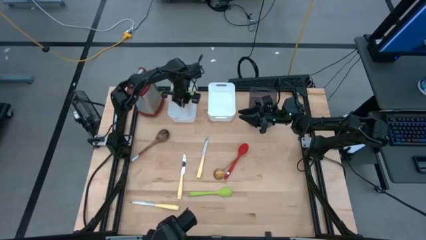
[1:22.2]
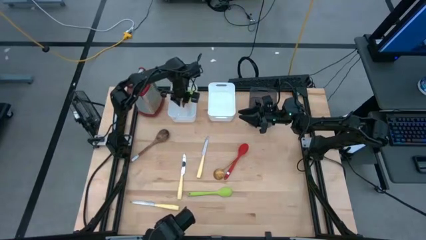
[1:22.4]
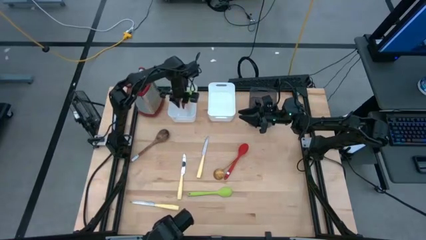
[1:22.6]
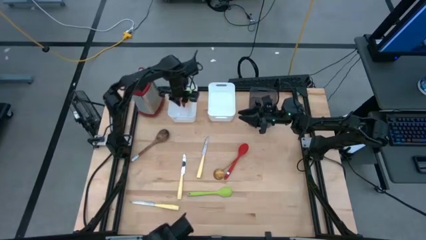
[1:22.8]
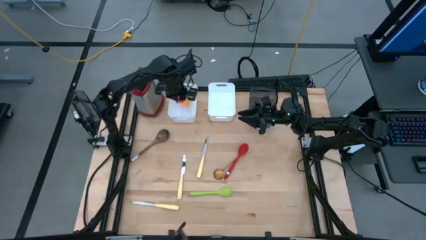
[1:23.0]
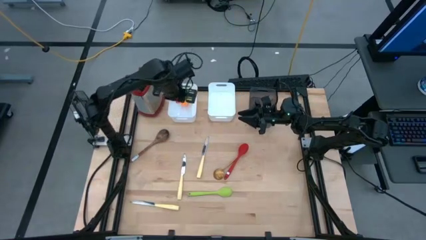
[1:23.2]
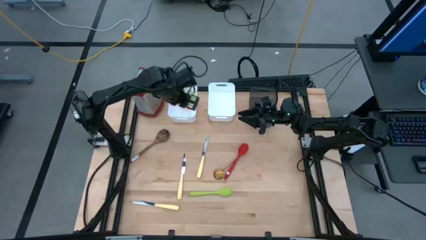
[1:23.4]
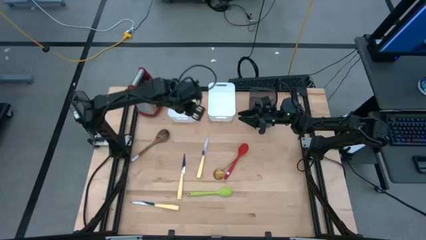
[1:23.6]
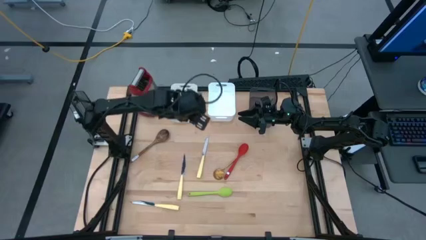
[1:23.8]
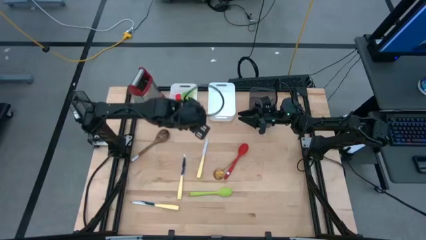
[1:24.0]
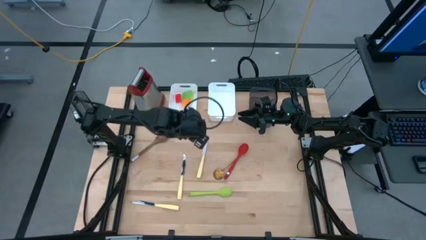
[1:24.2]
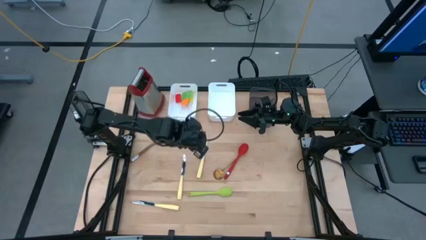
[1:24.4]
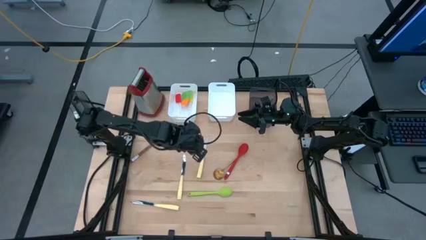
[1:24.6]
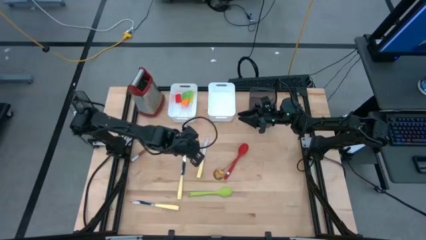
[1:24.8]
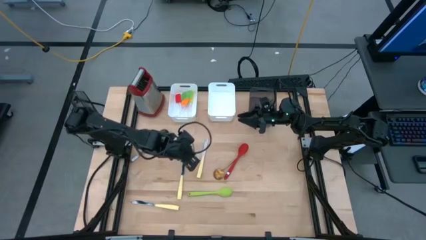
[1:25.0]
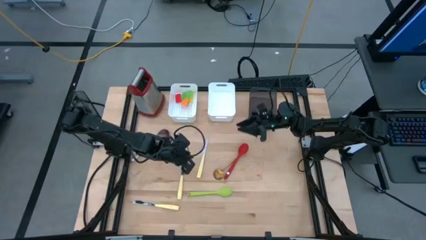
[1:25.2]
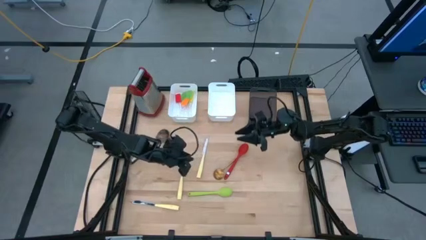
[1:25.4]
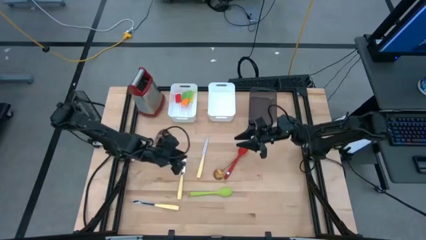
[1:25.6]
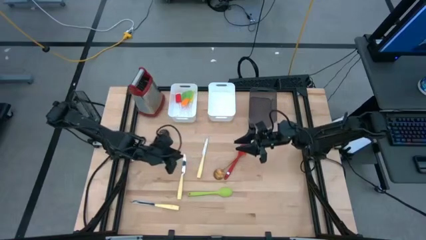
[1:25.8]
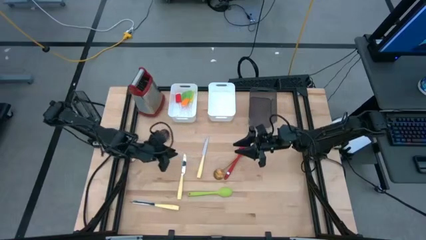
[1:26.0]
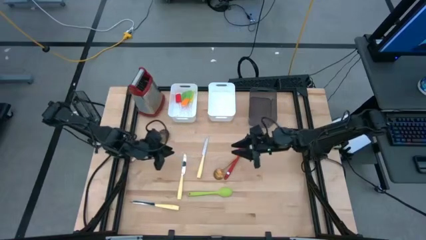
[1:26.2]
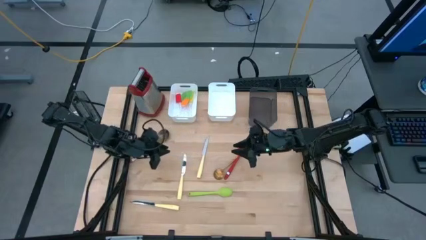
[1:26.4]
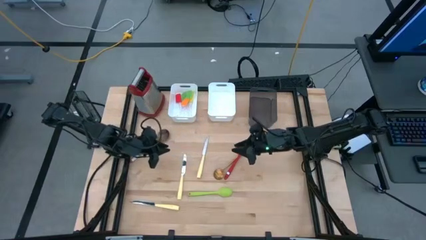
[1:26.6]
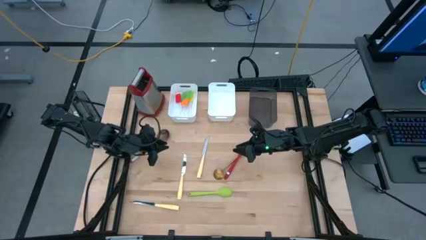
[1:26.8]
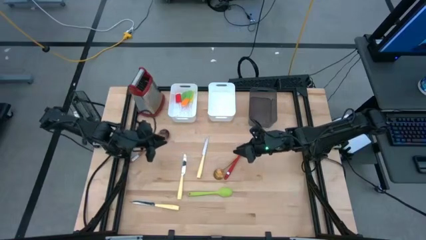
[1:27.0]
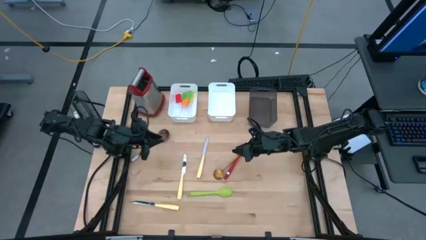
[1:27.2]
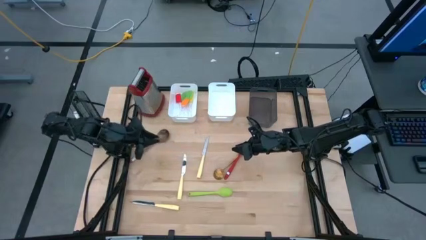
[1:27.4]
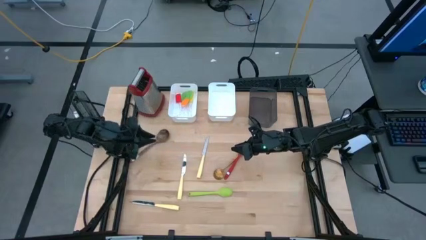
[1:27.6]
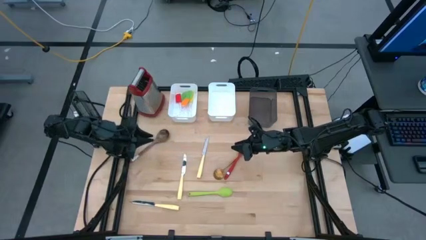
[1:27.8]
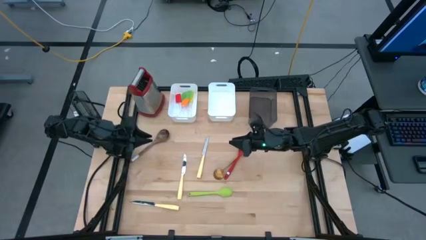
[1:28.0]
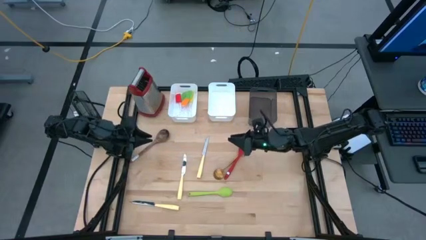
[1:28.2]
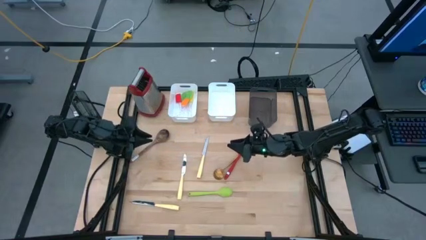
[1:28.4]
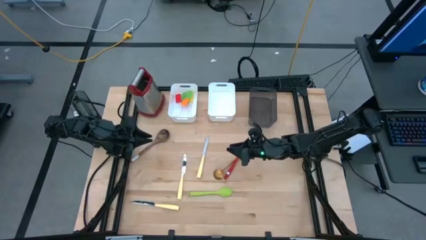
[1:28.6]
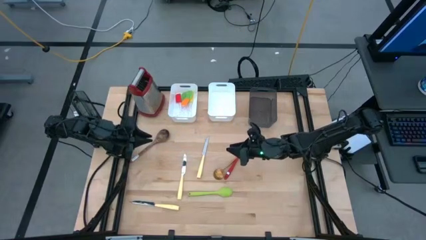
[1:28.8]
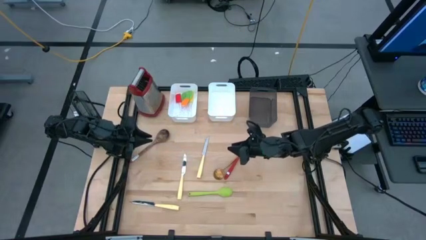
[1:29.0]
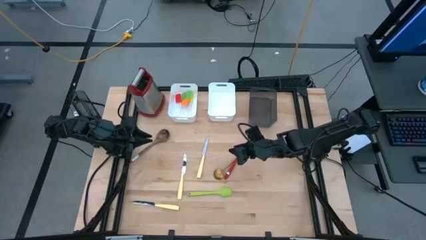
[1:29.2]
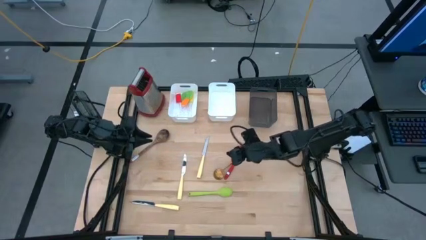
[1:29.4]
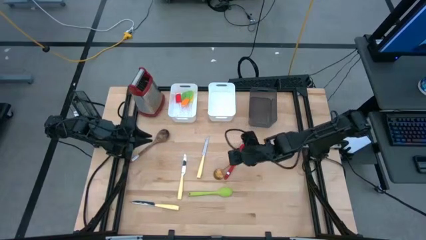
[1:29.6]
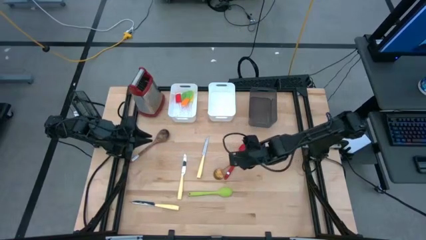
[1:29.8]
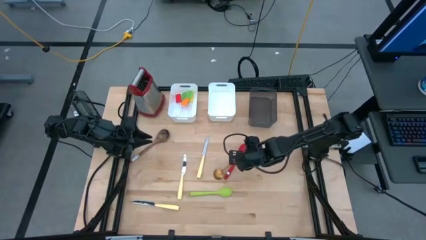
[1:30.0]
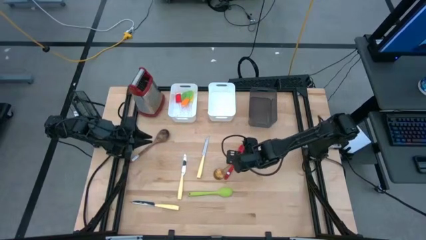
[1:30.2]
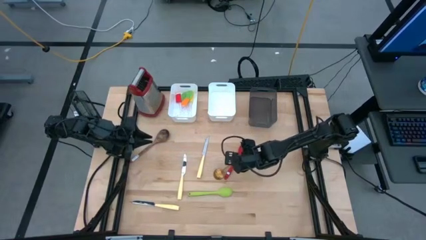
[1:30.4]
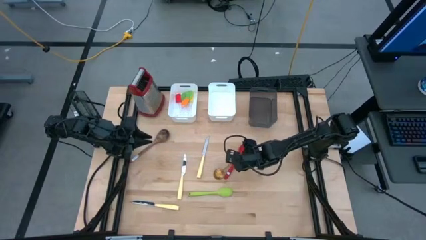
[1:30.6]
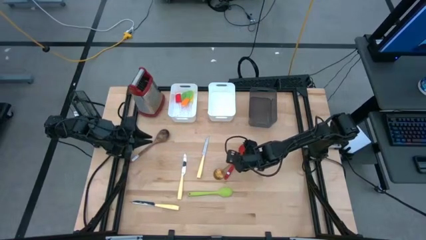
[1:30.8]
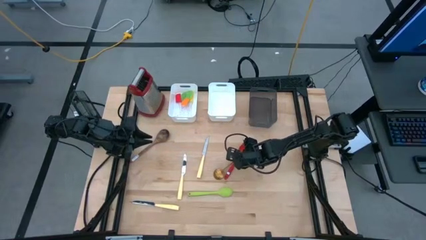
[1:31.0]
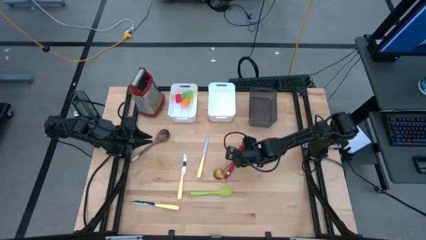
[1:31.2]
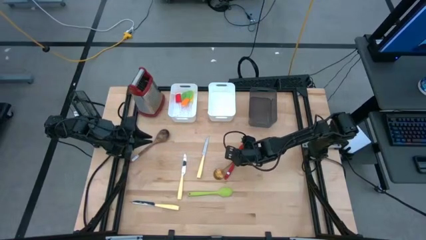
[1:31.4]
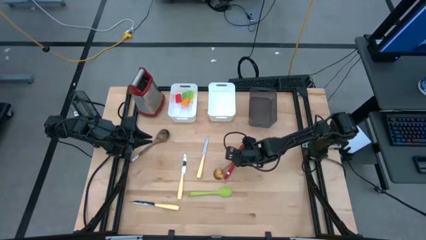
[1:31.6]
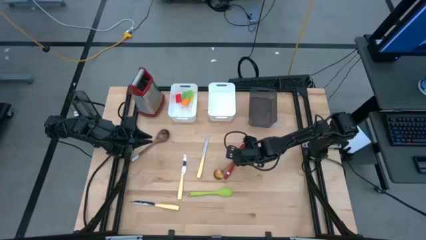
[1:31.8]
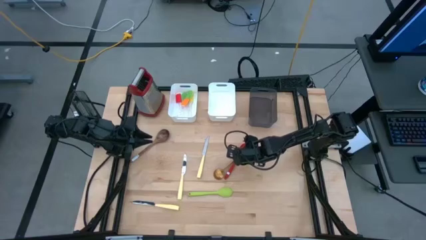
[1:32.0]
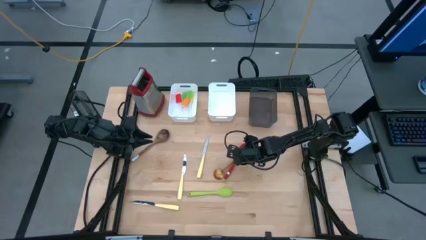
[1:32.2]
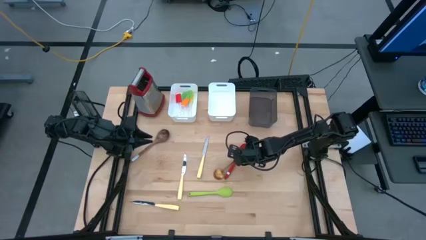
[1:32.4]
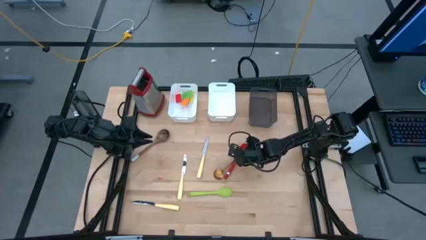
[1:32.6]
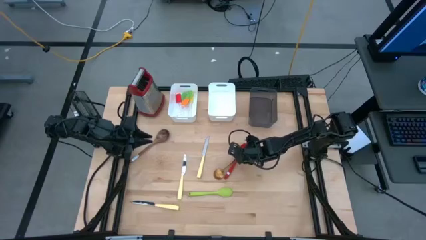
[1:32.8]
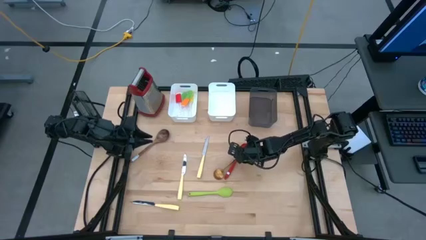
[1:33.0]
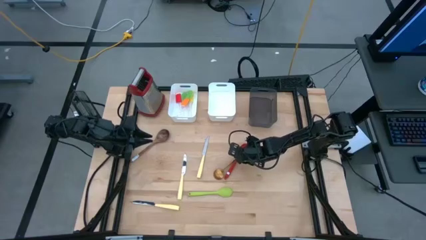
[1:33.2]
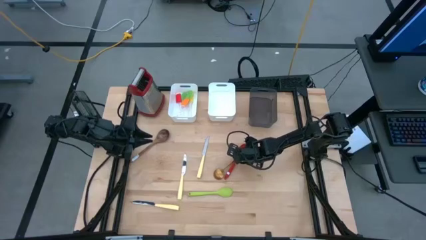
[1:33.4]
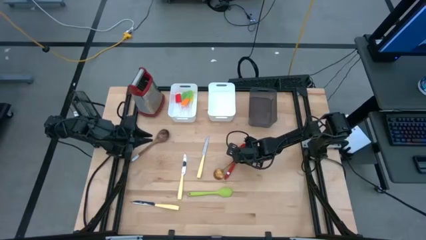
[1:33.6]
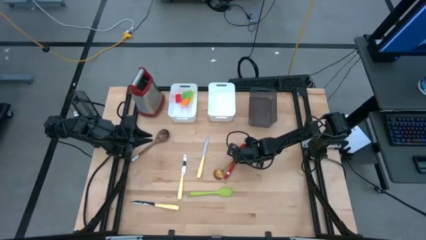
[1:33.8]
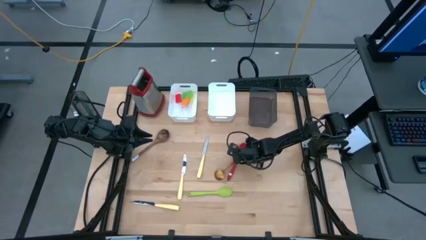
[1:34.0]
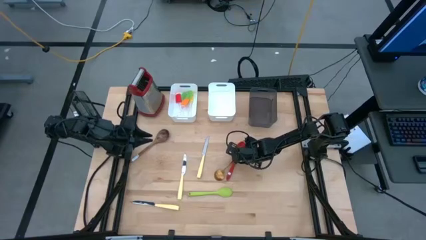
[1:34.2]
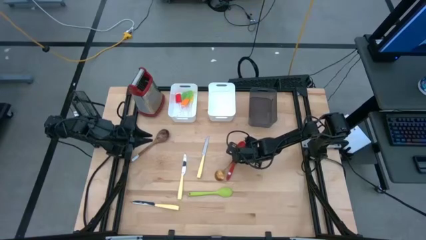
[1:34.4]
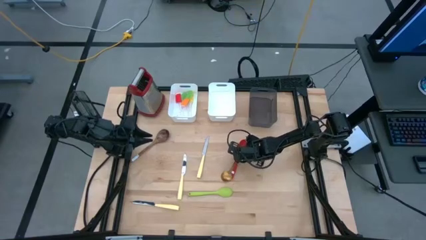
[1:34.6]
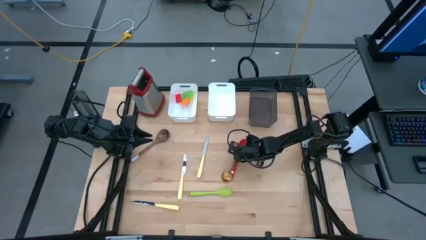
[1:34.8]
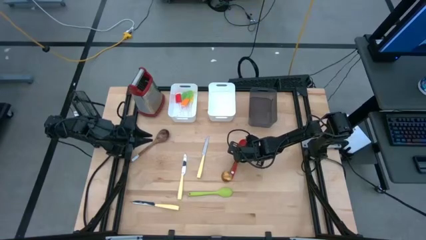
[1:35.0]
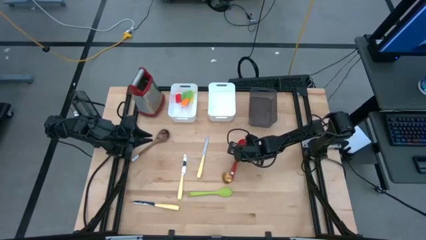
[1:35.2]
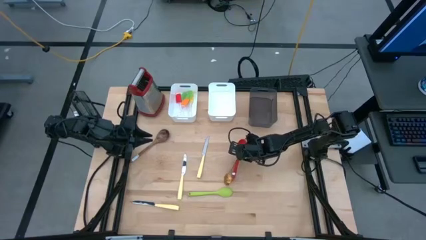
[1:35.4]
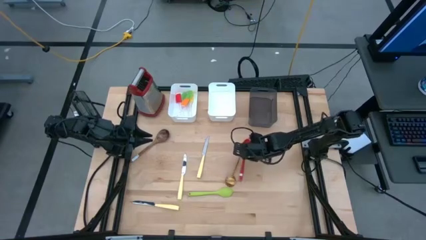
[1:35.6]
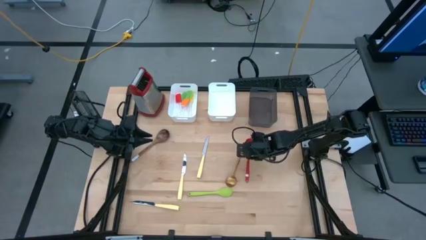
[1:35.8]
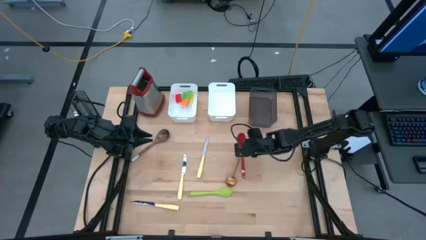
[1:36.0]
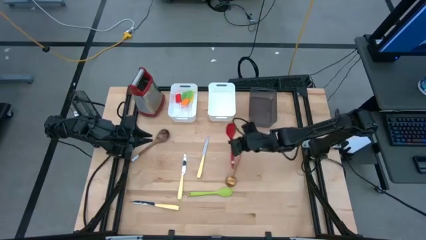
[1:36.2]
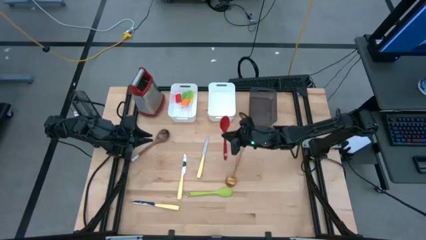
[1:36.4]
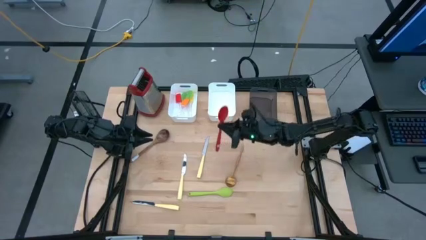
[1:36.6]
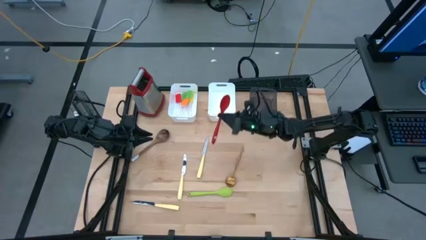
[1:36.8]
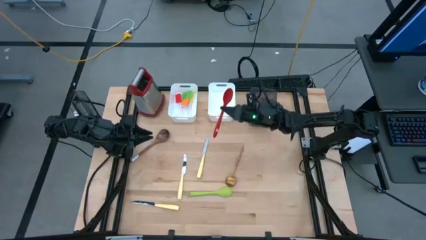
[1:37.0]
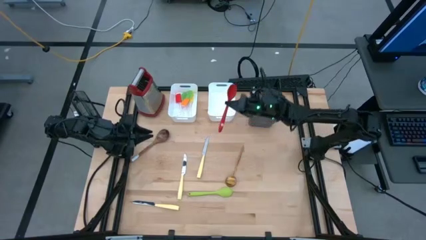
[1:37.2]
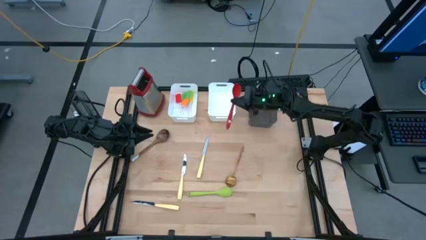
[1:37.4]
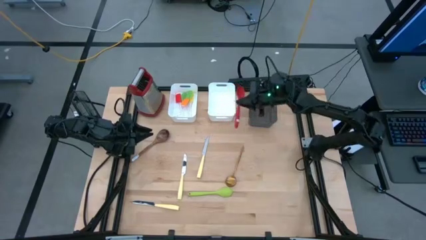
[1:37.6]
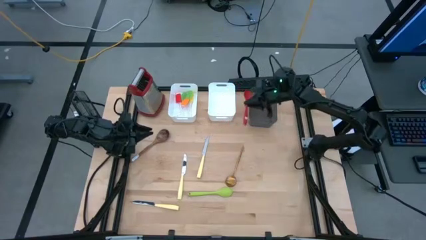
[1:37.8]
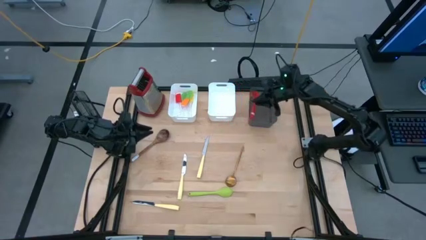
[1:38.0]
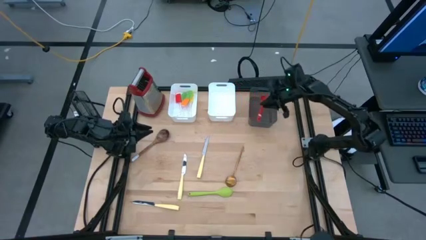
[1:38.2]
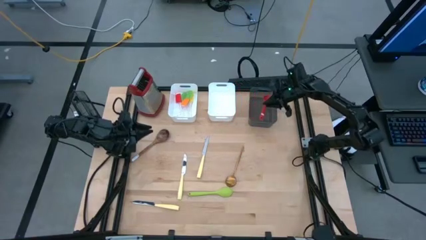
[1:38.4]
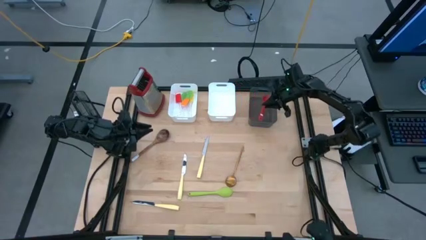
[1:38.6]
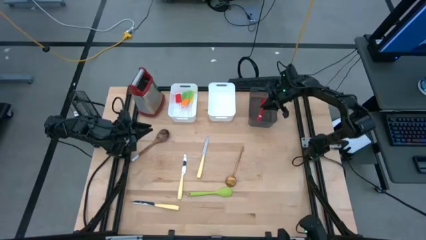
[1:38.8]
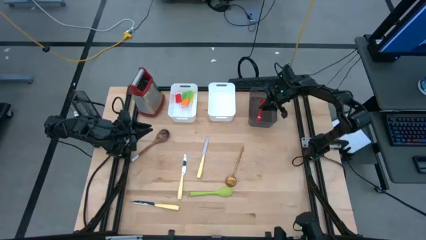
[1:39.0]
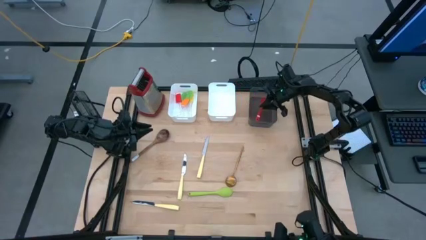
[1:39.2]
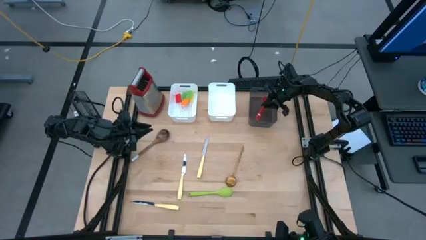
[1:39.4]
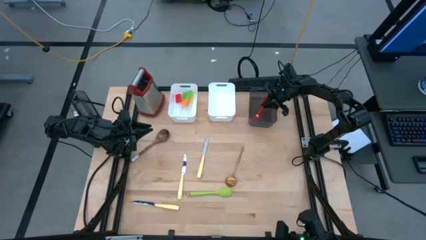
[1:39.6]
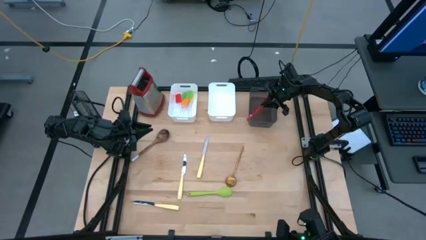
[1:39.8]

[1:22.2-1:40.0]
Task: Pick & Place Kitchen Items
Put the red serving spoon into the black bin
